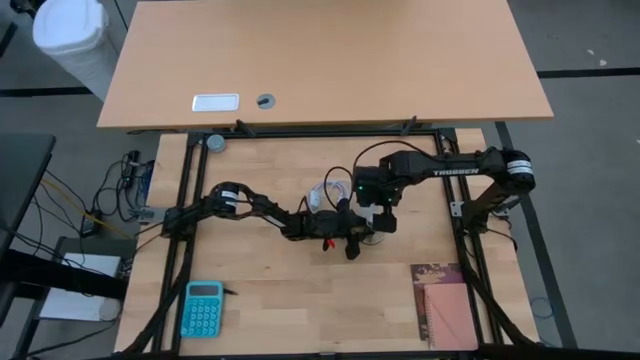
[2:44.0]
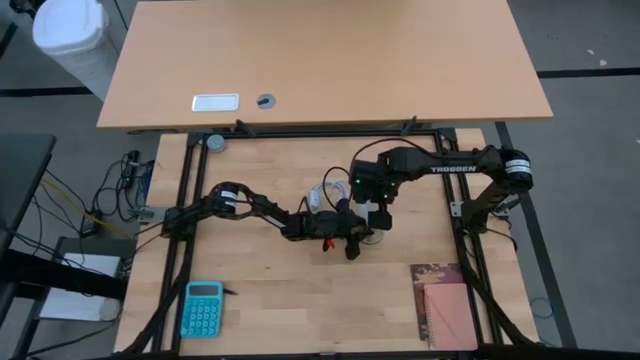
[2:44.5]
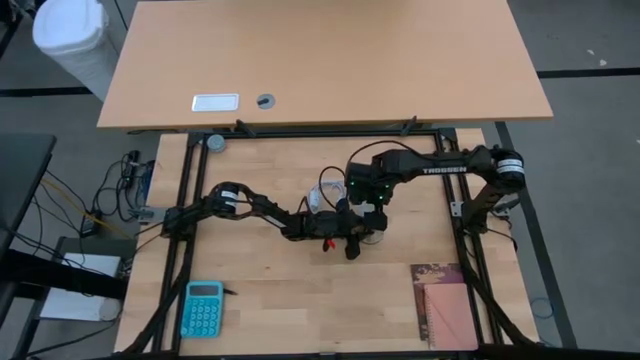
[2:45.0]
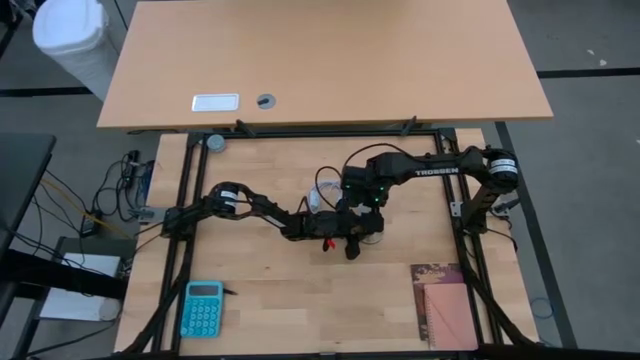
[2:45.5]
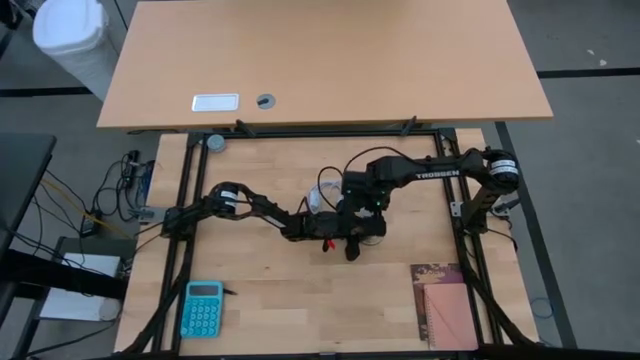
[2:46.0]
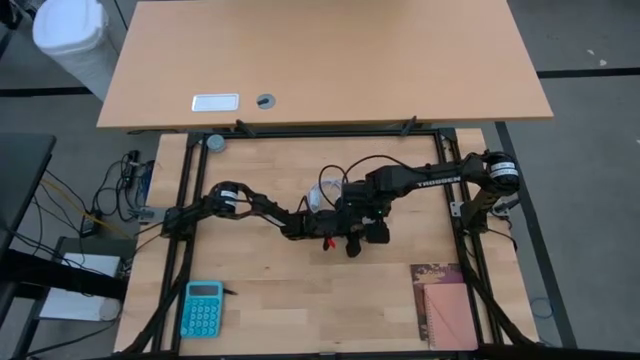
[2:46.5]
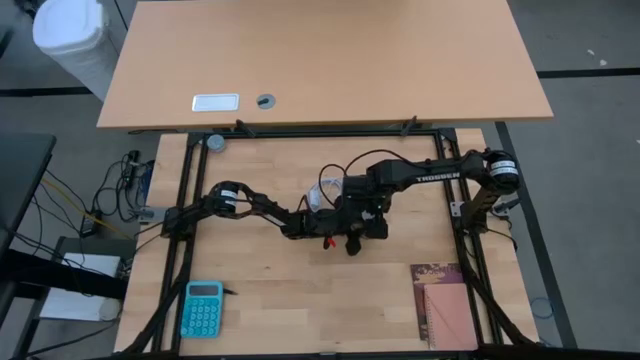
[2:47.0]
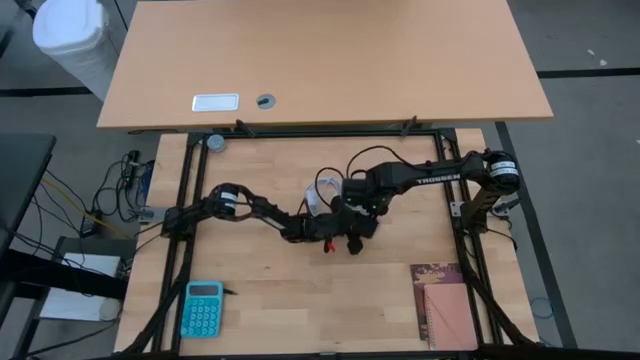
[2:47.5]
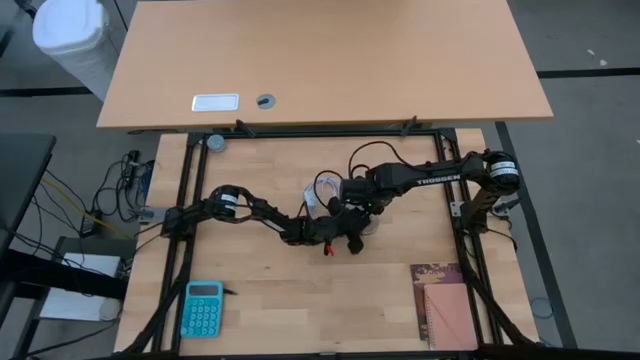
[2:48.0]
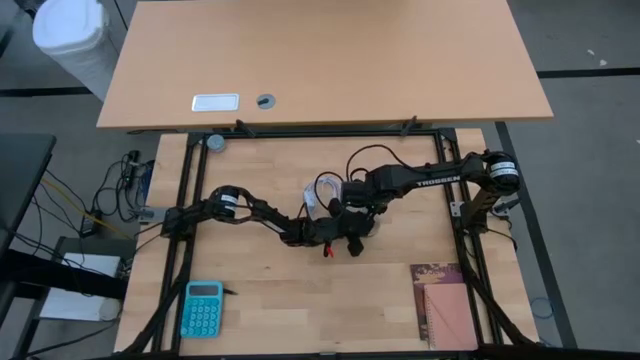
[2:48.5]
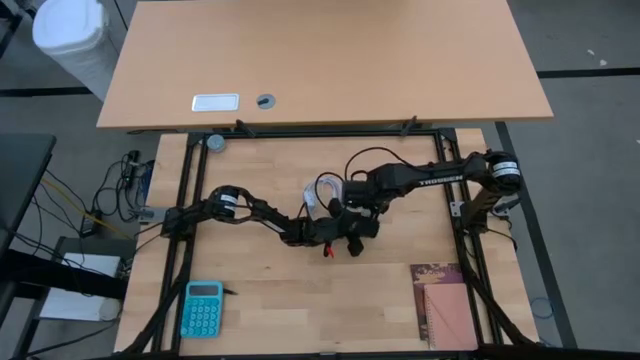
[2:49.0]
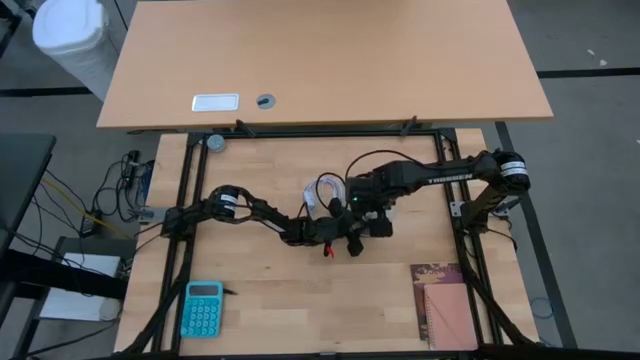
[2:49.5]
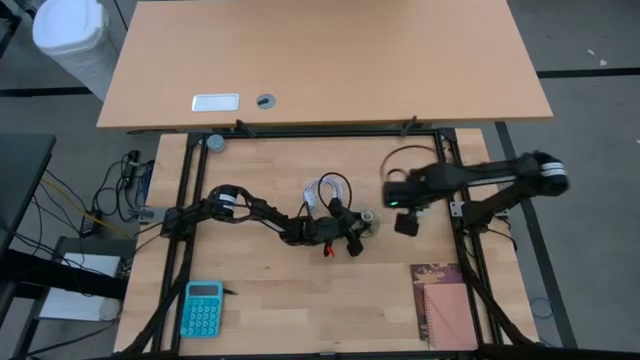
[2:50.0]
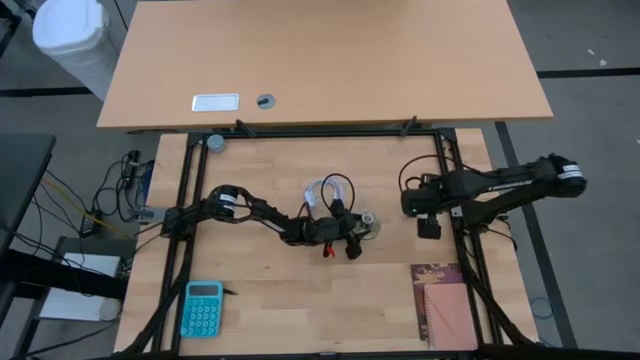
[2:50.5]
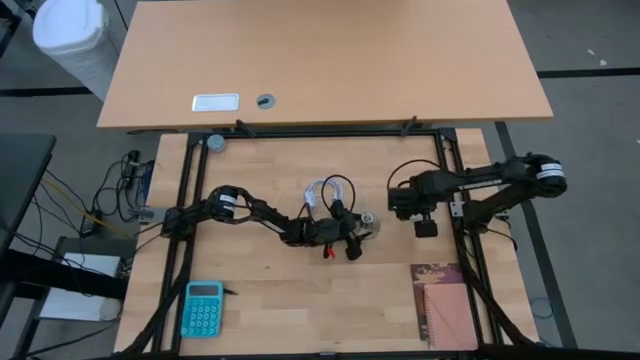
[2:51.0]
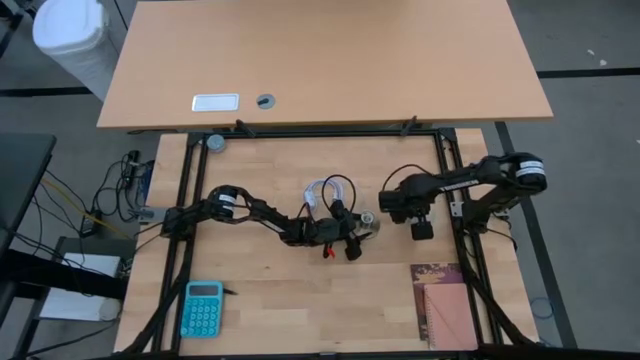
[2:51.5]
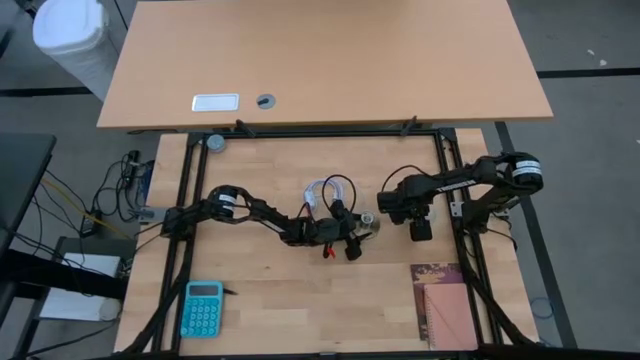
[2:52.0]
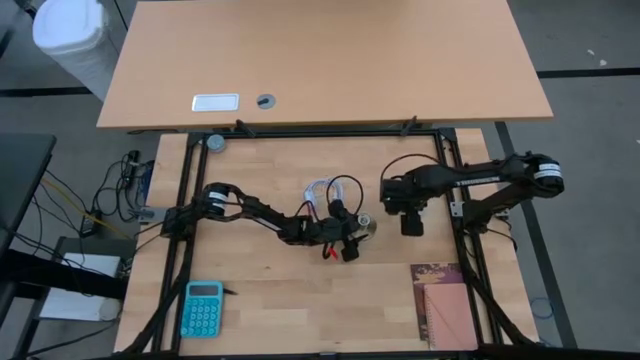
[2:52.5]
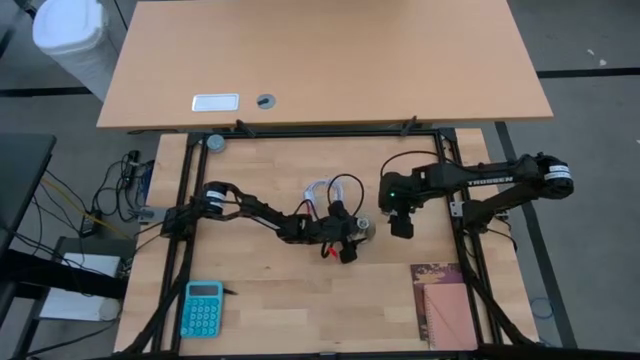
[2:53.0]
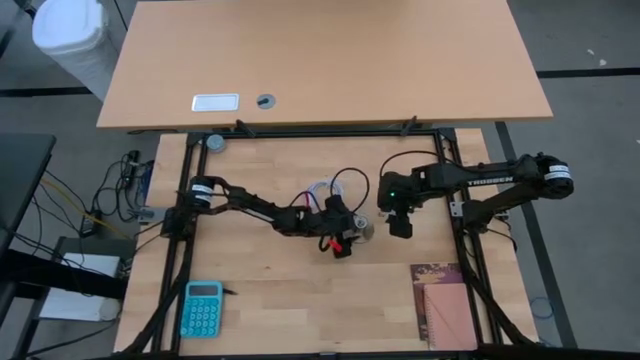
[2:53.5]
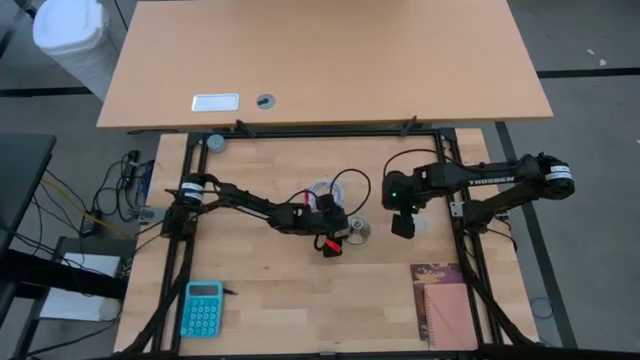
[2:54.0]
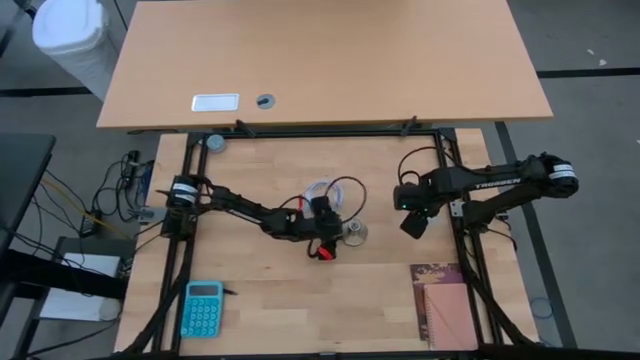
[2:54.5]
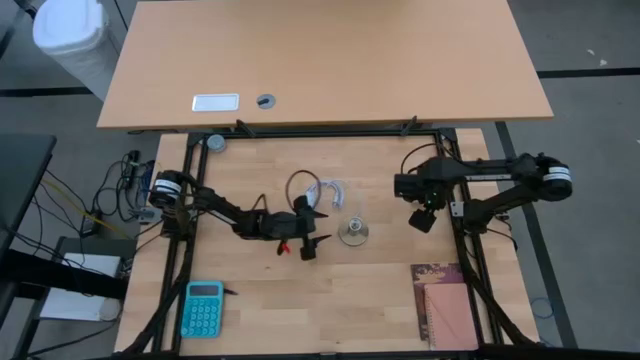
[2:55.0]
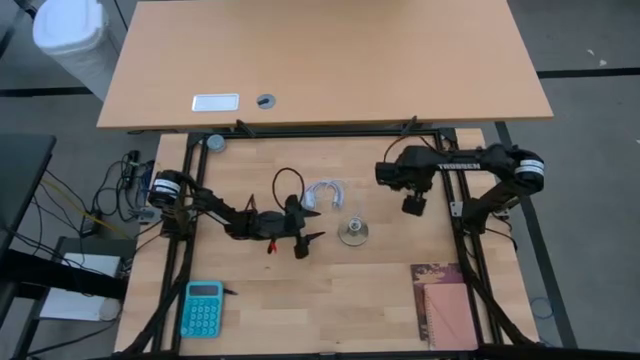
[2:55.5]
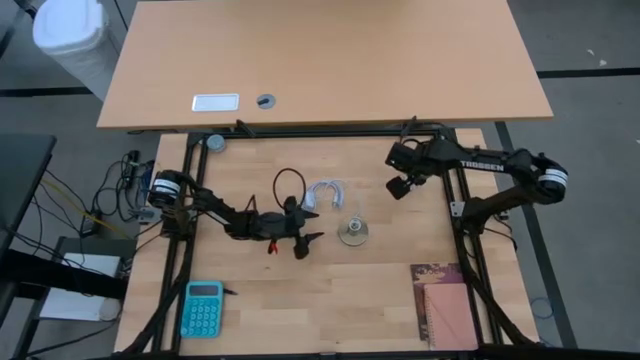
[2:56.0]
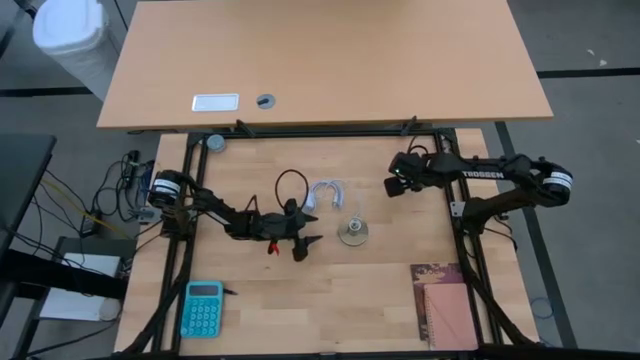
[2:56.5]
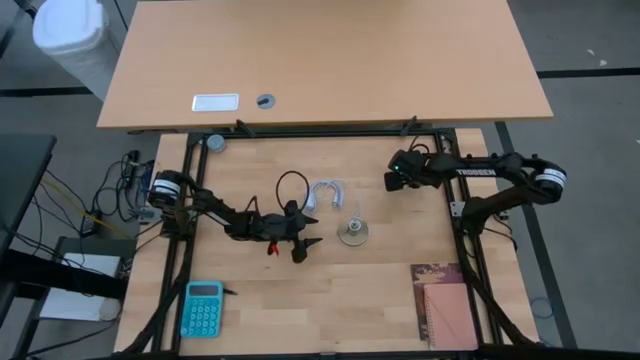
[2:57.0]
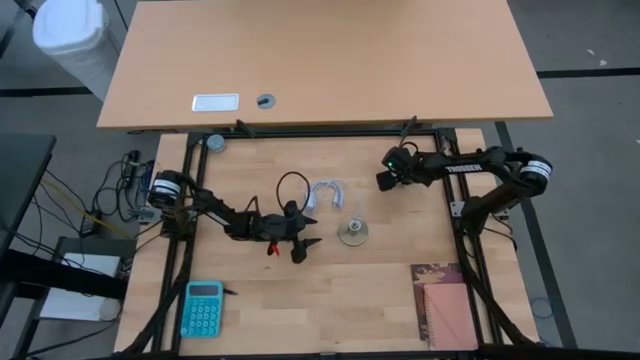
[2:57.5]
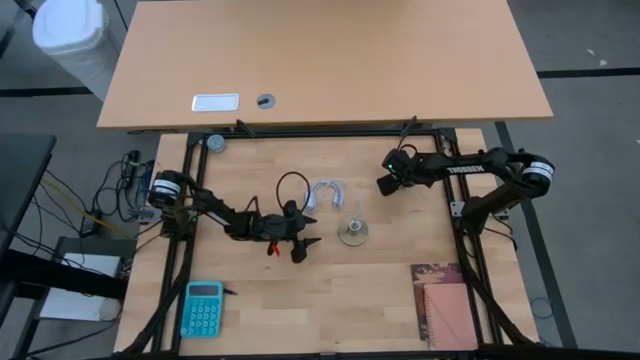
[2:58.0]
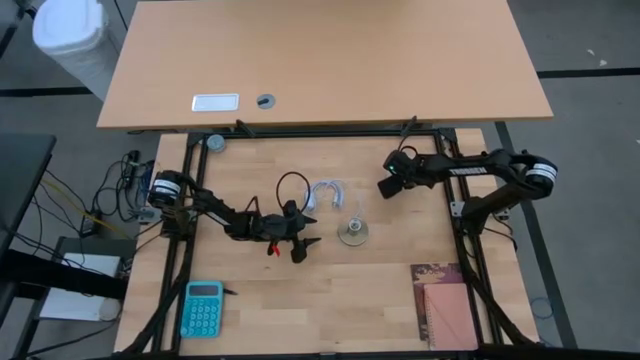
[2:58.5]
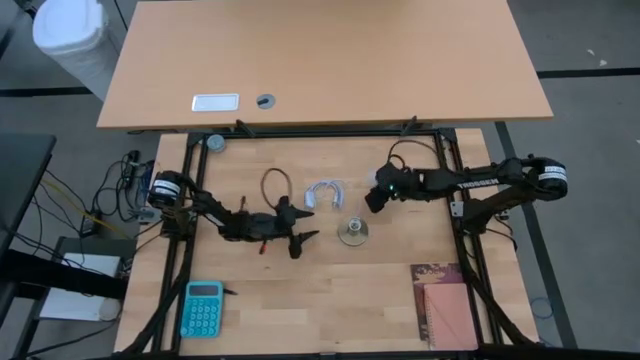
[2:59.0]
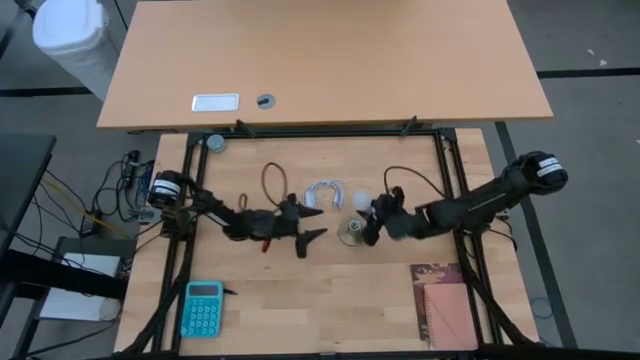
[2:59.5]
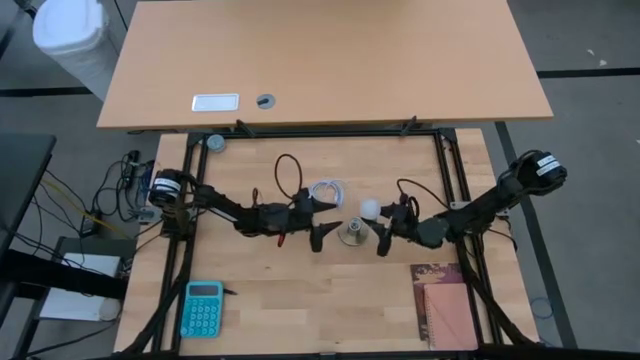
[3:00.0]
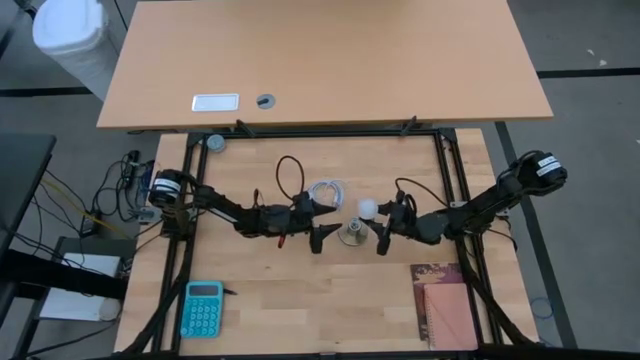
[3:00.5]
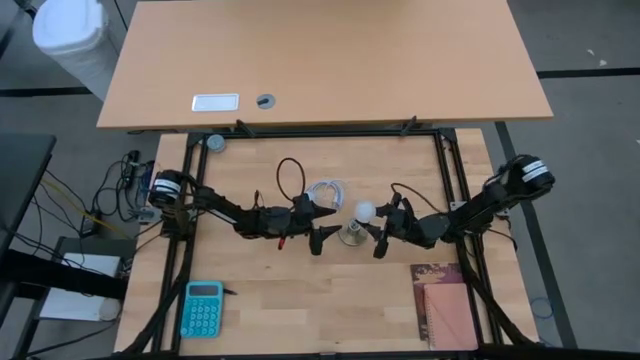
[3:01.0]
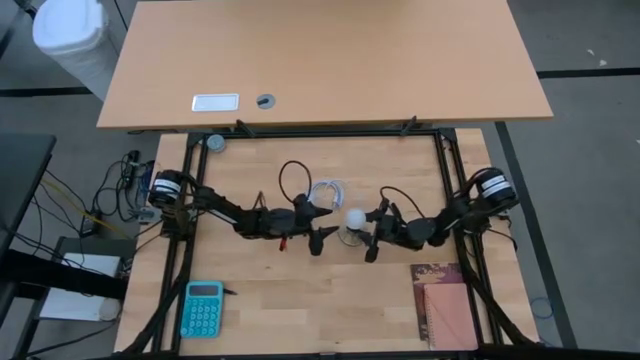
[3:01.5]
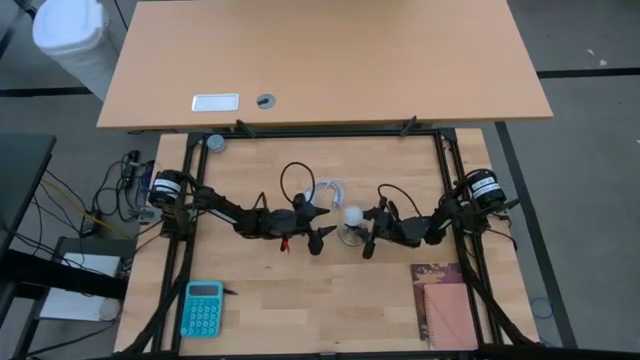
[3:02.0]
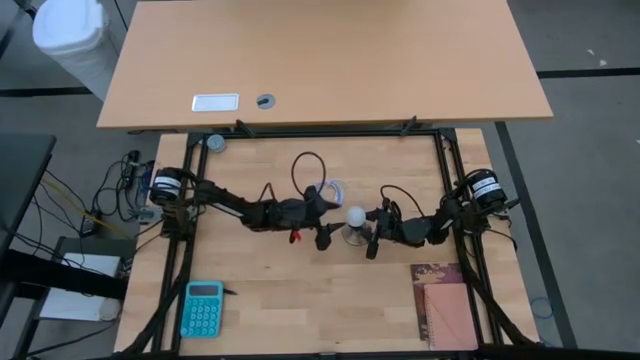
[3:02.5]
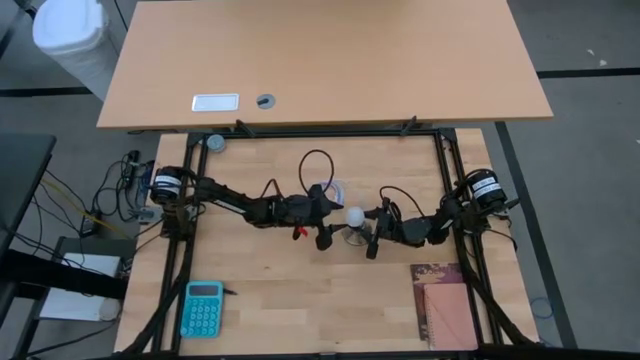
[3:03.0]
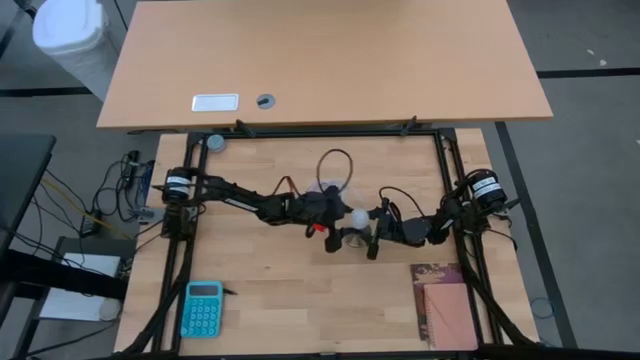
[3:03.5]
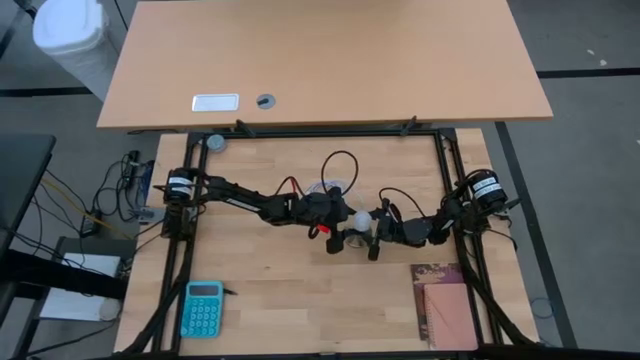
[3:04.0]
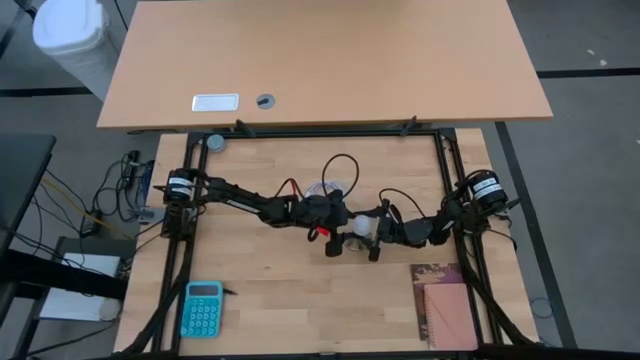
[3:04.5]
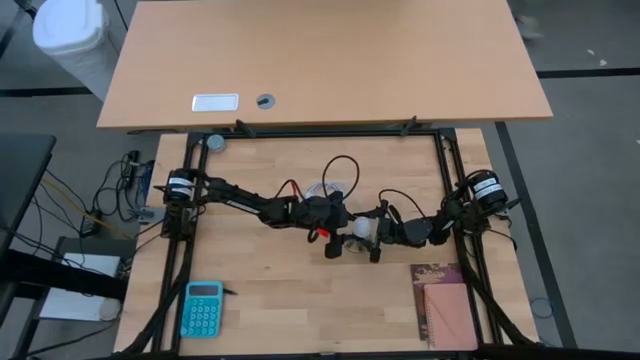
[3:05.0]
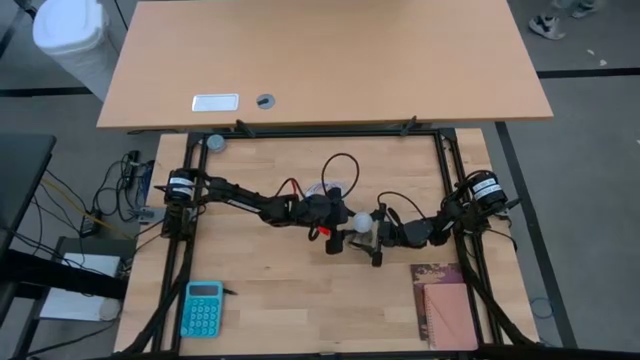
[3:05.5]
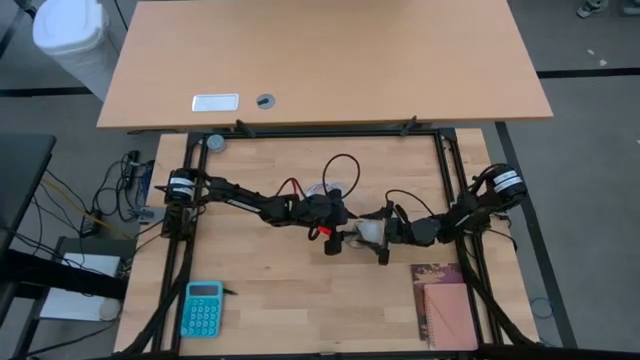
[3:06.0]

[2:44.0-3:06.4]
Task: Screw lightbulb
Insert the white lightbulb into the lamp socket
